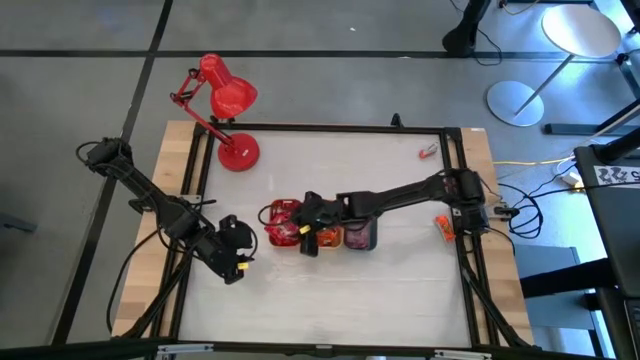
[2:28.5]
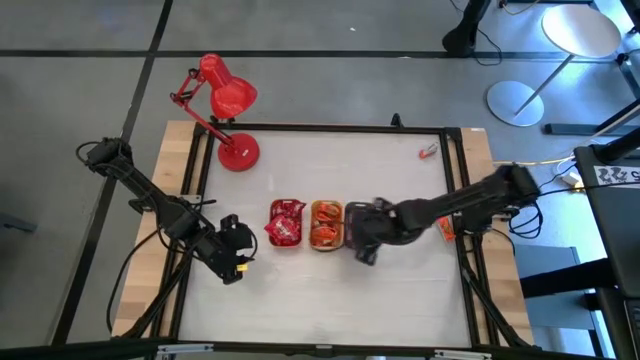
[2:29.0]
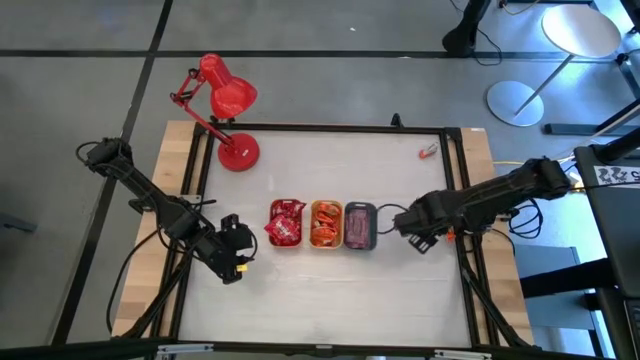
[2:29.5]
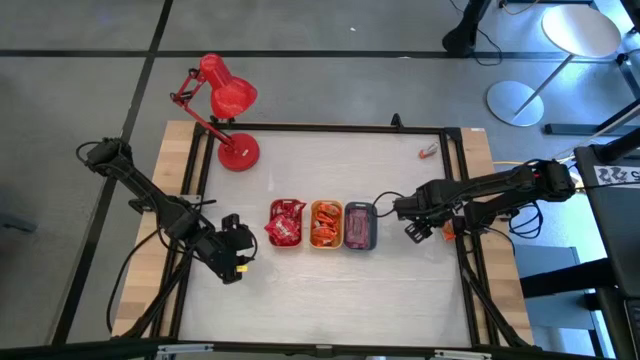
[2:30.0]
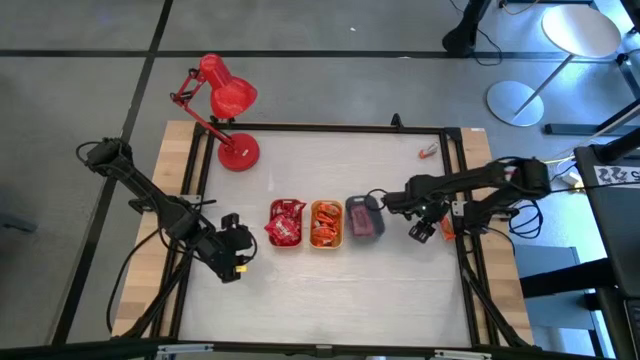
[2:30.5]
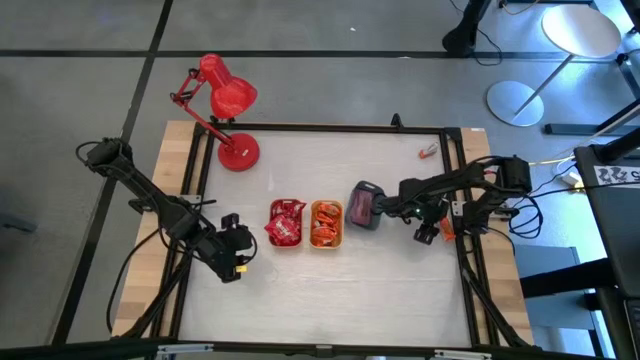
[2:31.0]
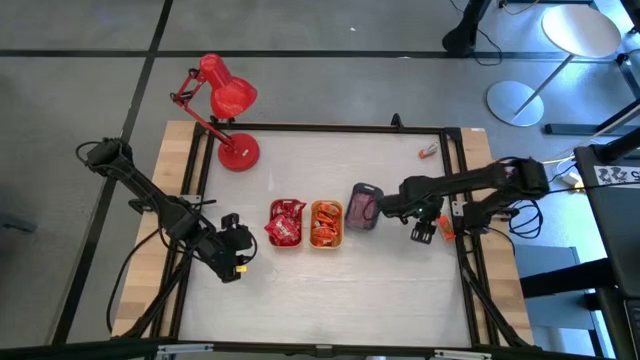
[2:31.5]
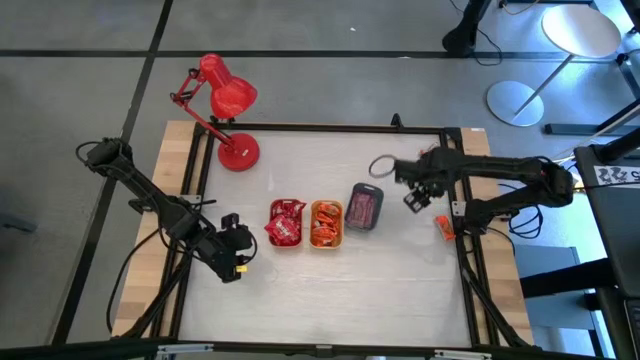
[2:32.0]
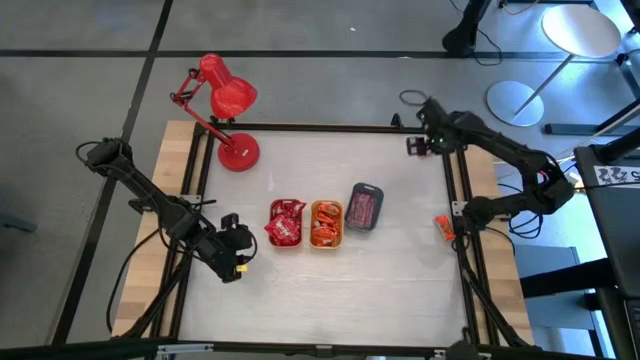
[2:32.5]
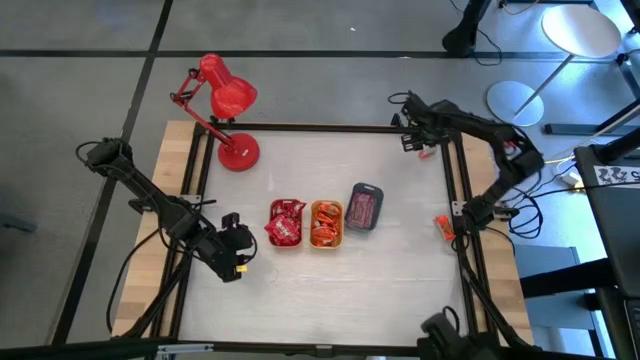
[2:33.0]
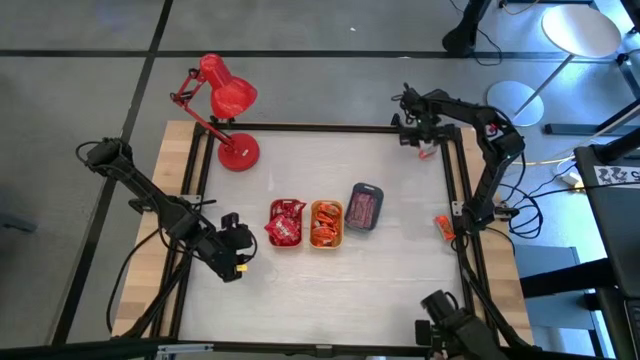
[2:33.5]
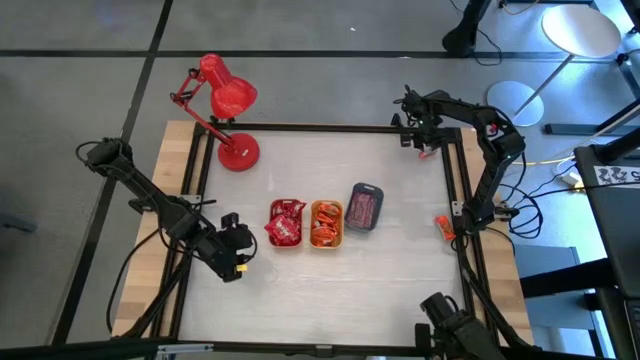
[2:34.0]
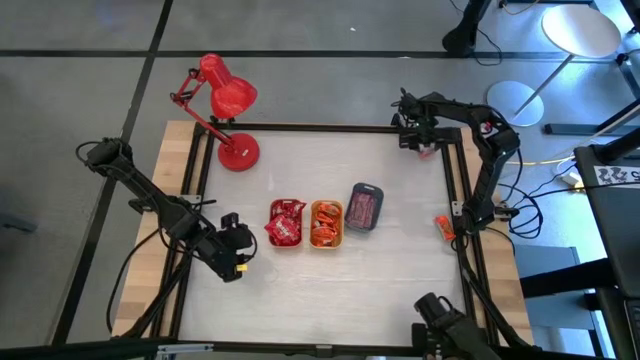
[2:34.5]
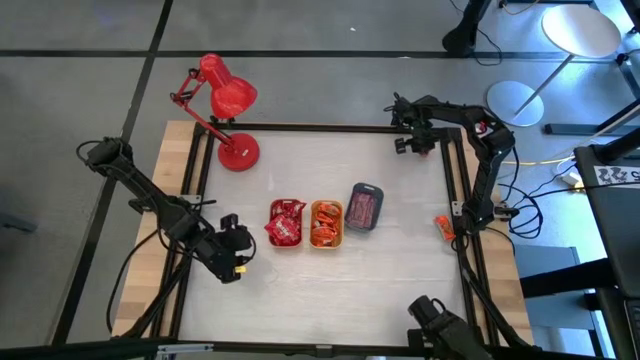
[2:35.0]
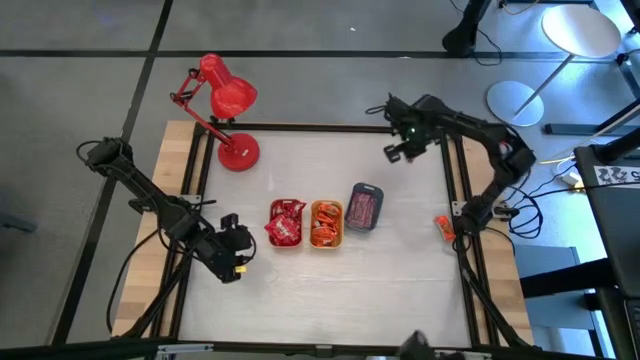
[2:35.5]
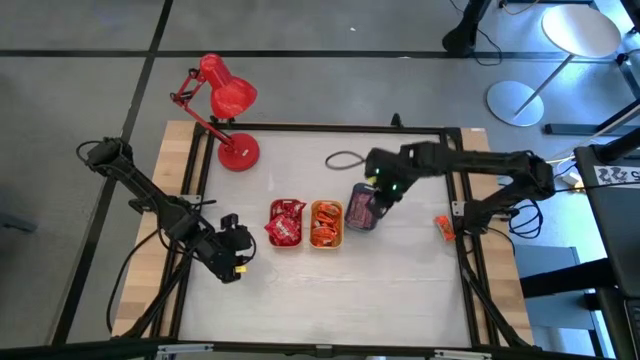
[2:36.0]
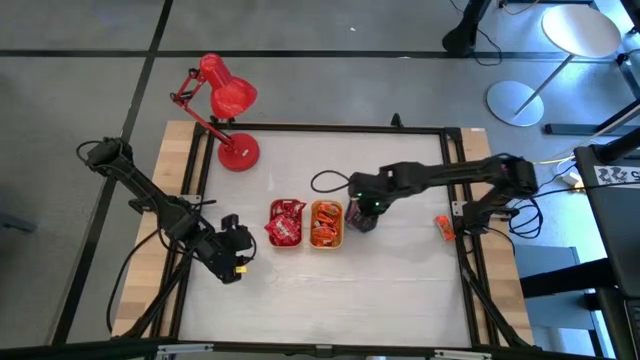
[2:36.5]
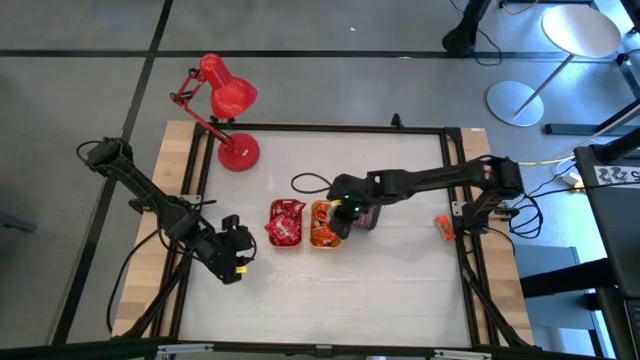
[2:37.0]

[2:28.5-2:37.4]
Task: Sort candy
Put the orange candy into the yellow bin

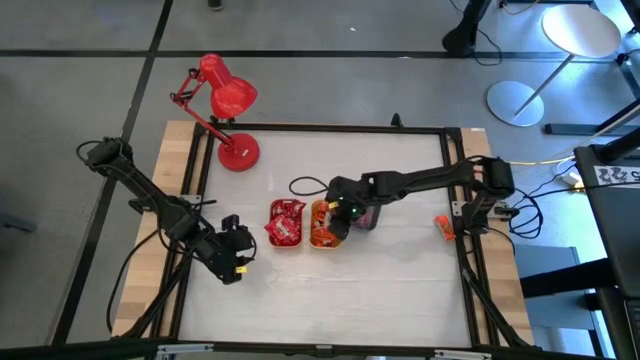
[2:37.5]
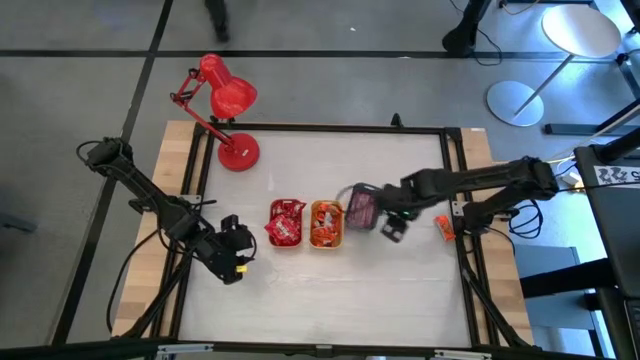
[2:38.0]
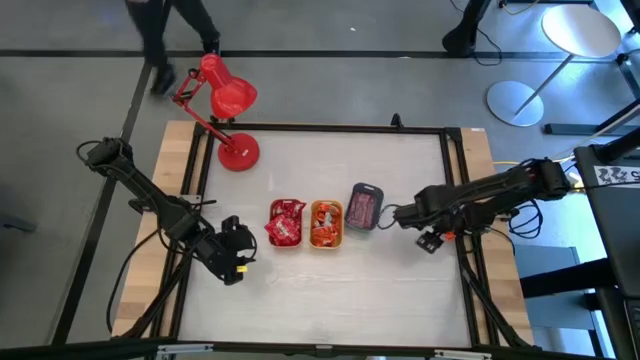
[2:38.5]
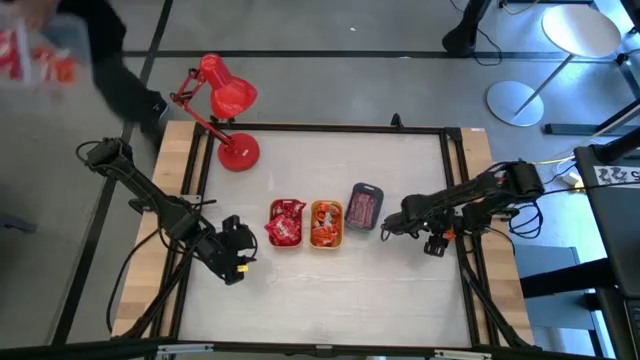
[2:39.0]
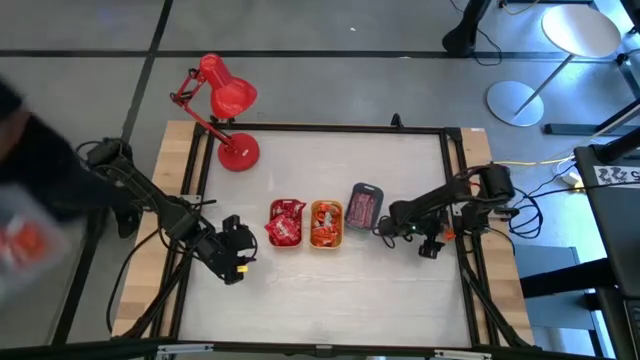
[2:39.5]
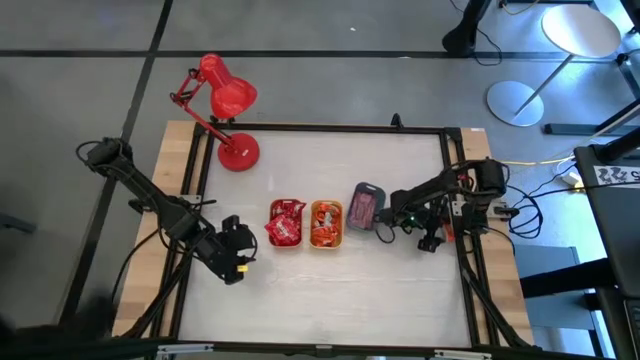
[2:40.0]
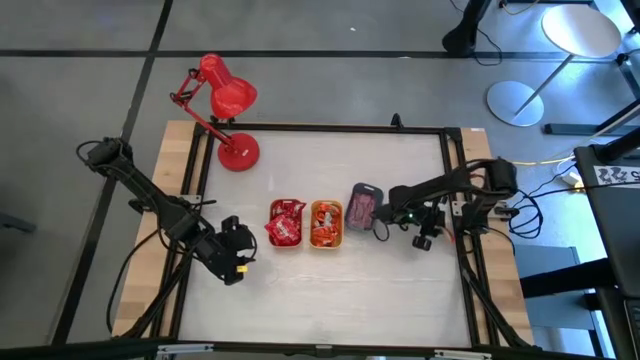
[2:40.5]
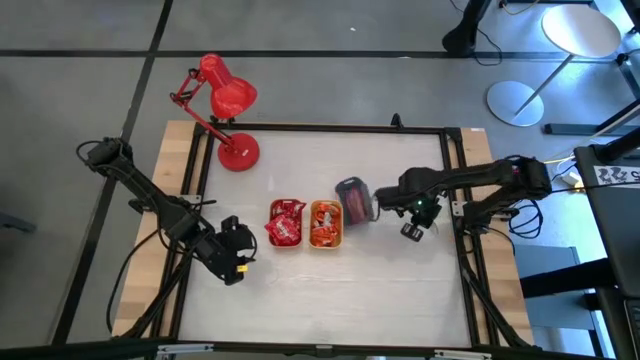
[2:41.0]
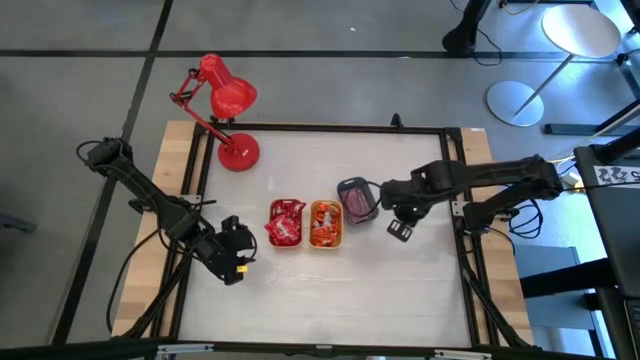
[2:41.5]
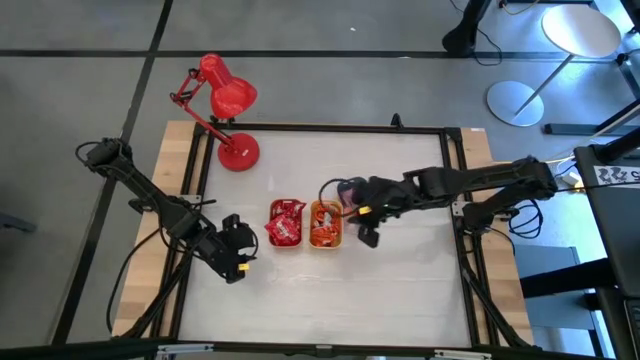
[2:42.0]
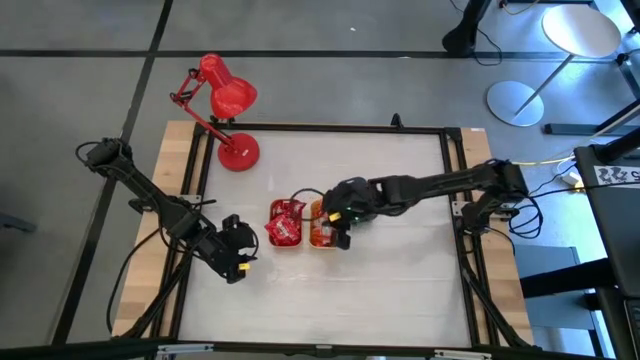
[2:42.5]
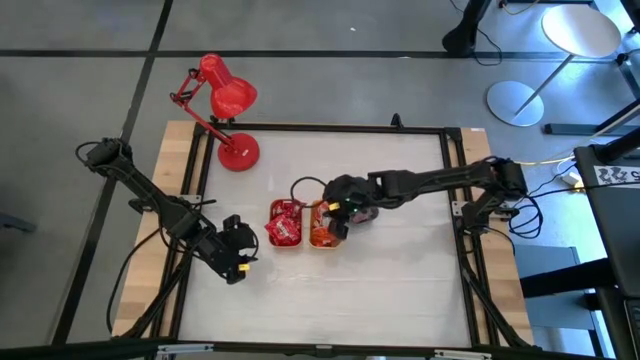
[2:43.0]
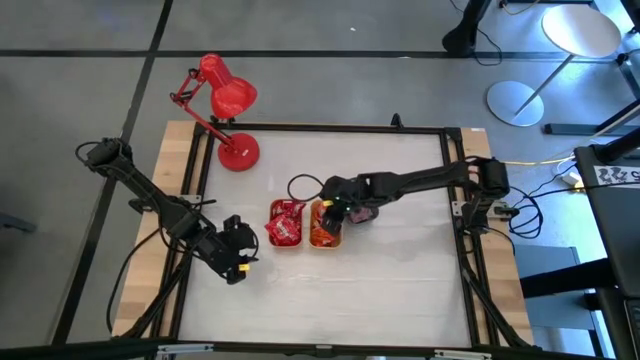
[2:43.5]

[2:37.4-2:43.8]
Put the orange candy into the yellow bin

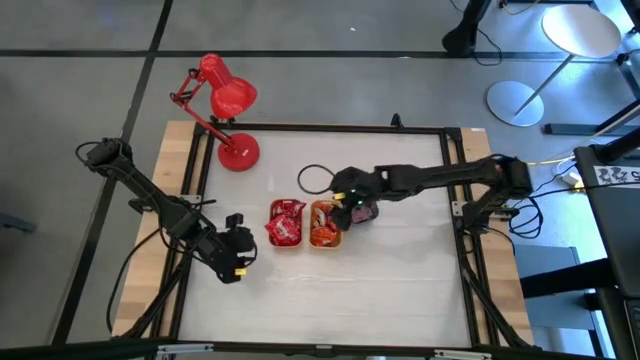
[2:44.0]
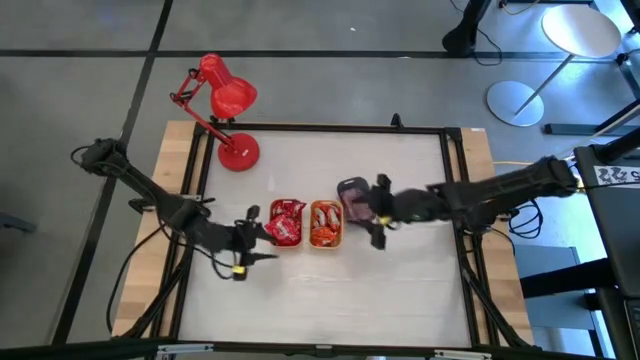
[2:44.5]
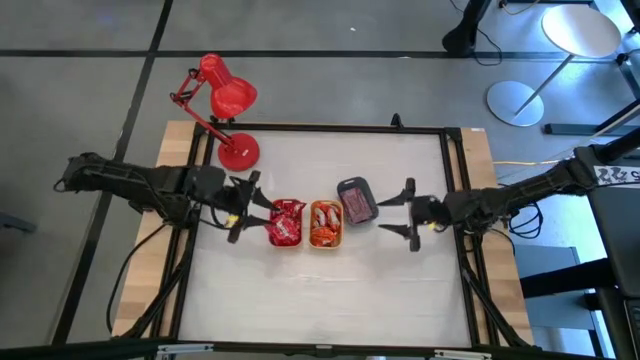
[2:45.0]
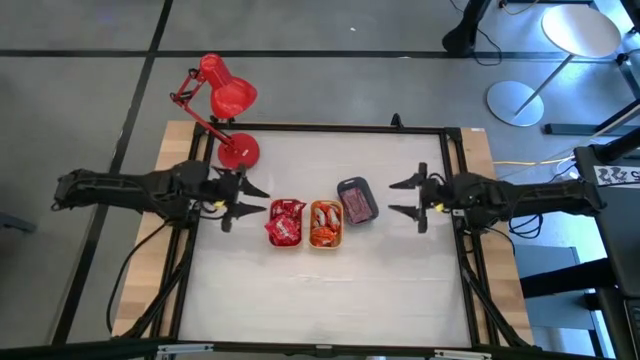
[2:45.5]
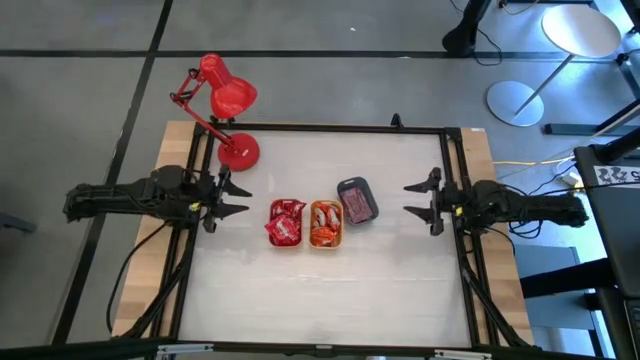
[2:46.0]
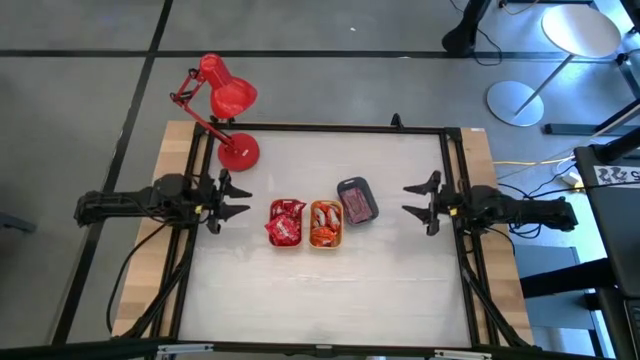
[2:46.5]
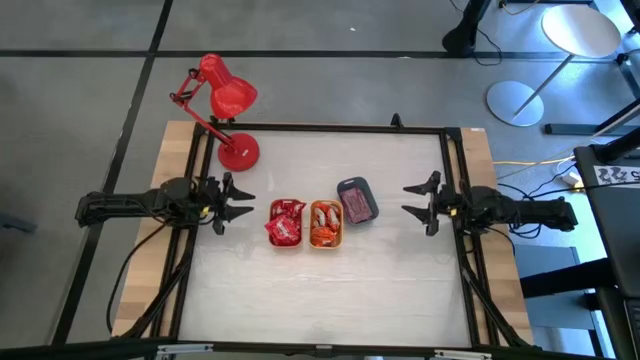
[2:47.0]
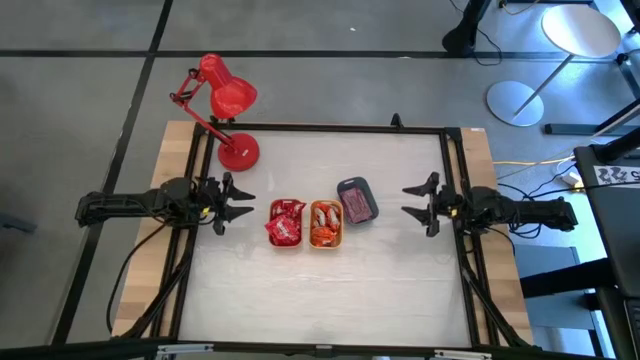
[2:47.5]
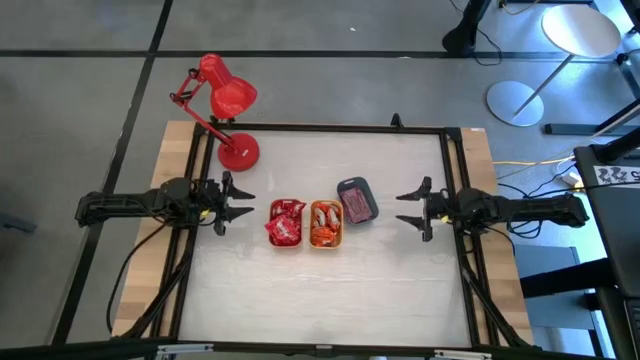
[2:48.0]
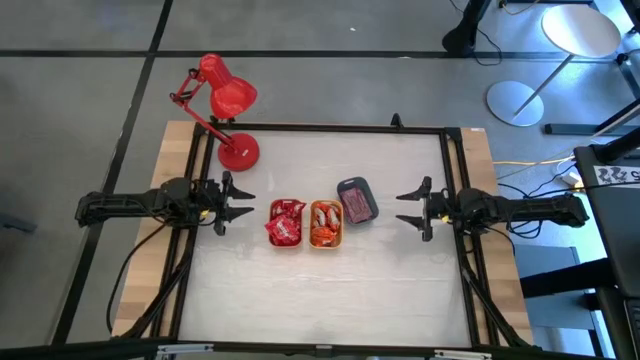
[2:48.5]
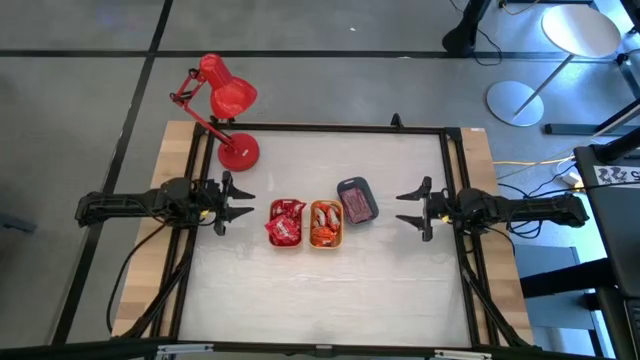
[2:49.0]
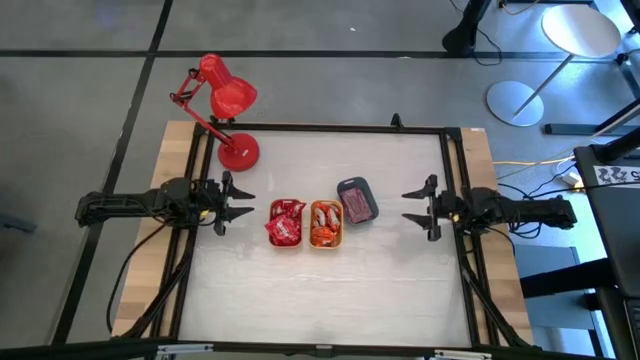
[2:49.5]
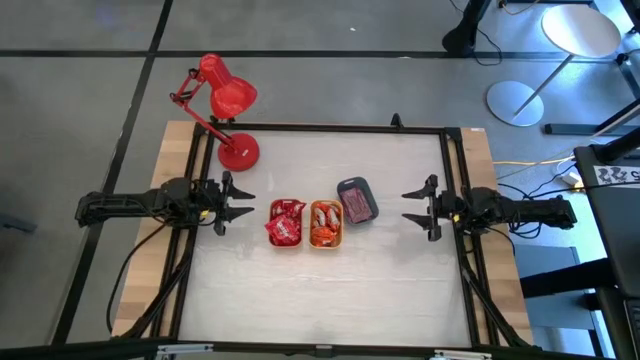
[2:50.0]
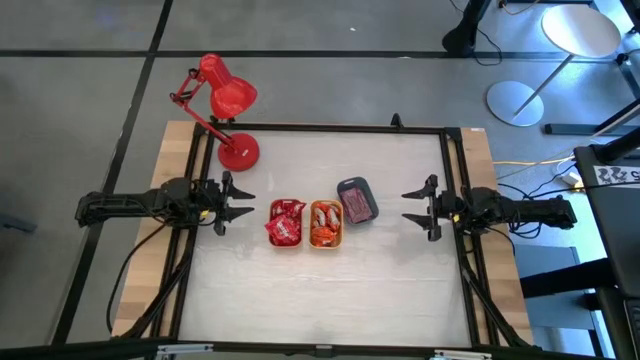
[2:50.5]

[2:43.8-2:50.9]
Return to Home Position
